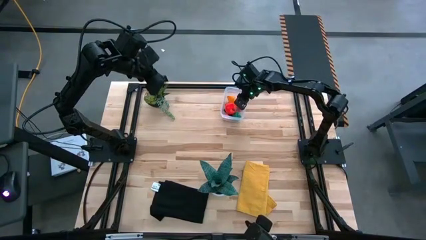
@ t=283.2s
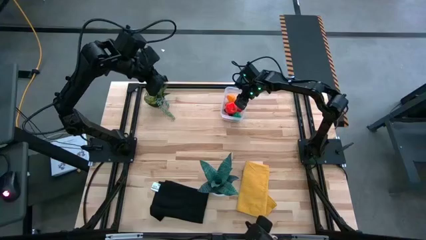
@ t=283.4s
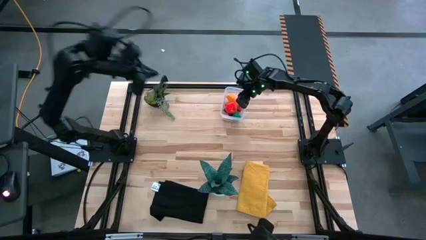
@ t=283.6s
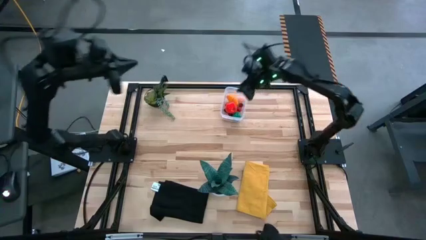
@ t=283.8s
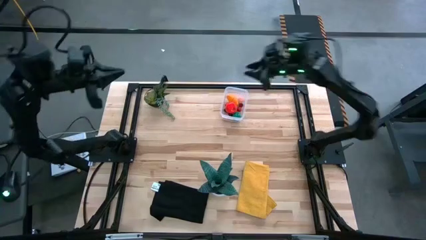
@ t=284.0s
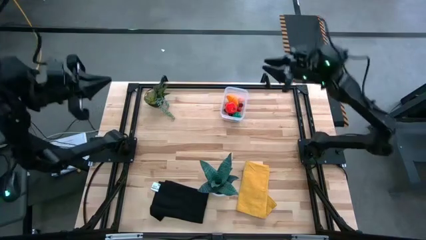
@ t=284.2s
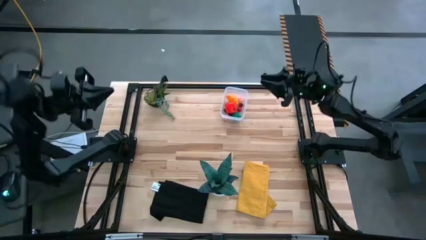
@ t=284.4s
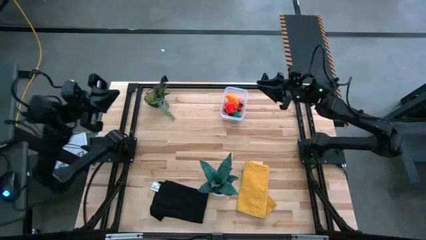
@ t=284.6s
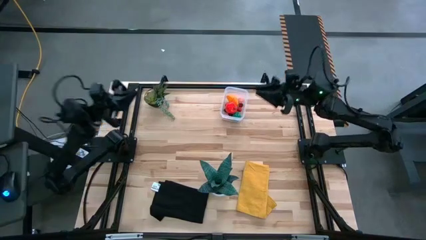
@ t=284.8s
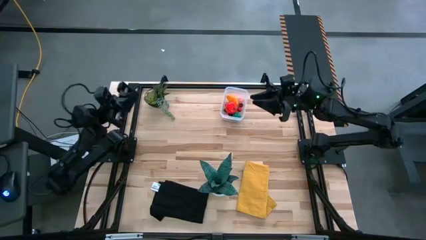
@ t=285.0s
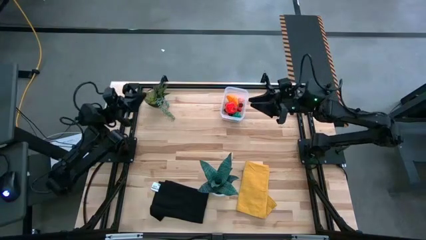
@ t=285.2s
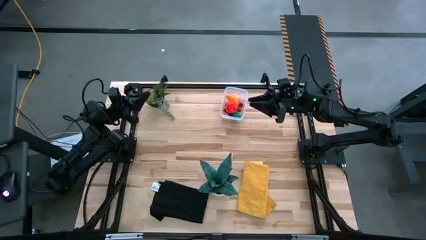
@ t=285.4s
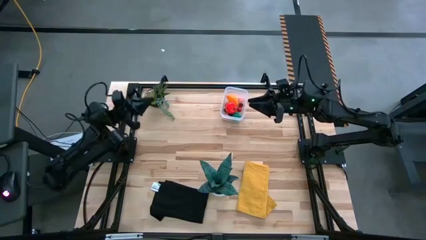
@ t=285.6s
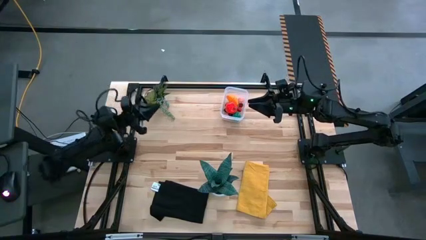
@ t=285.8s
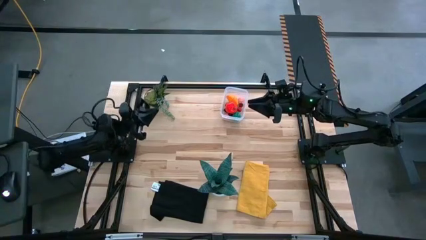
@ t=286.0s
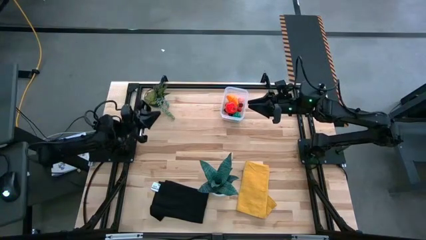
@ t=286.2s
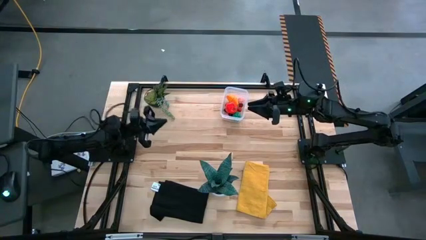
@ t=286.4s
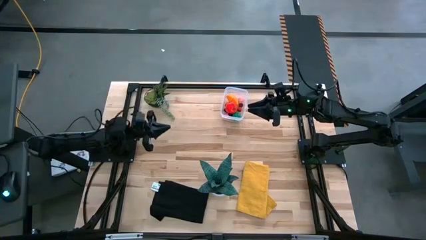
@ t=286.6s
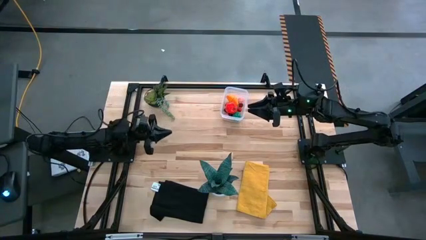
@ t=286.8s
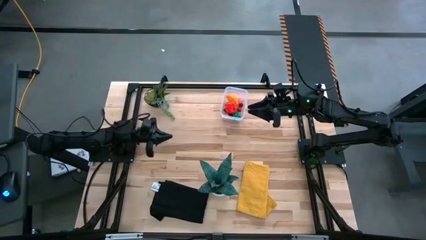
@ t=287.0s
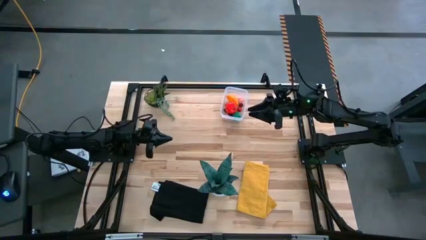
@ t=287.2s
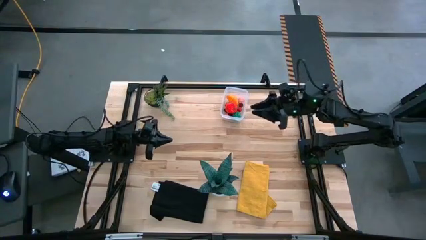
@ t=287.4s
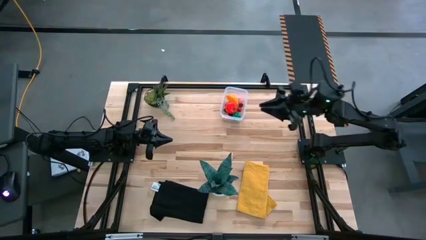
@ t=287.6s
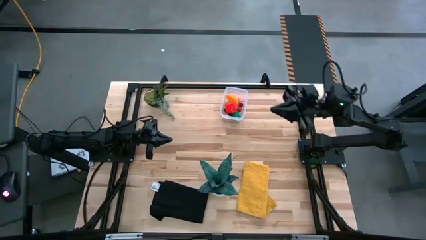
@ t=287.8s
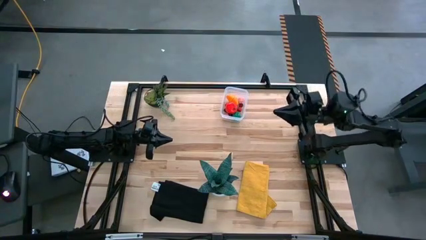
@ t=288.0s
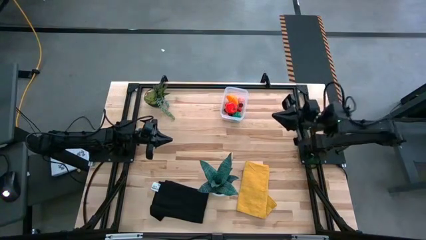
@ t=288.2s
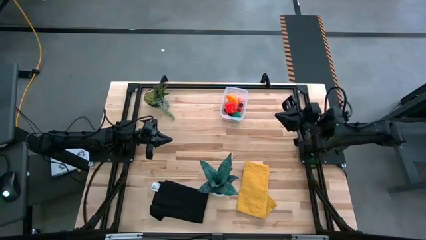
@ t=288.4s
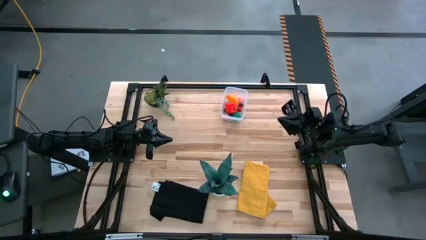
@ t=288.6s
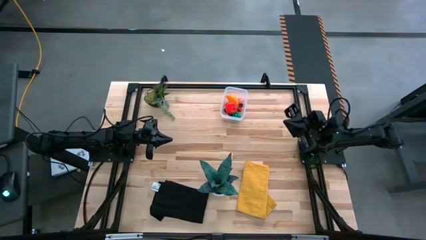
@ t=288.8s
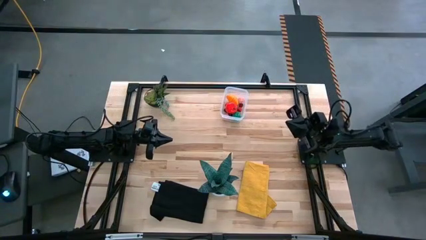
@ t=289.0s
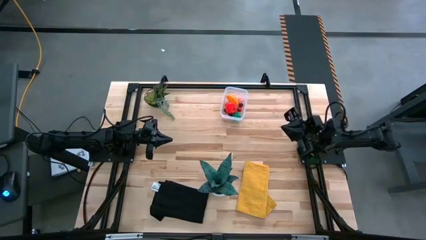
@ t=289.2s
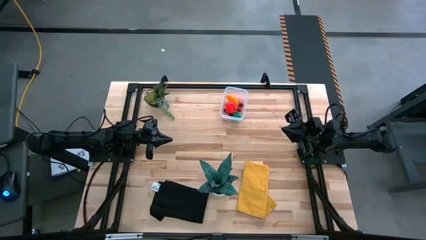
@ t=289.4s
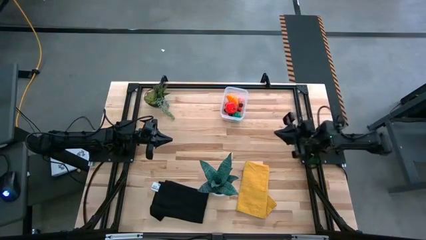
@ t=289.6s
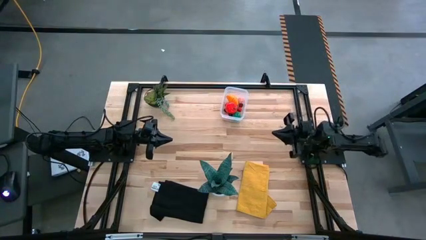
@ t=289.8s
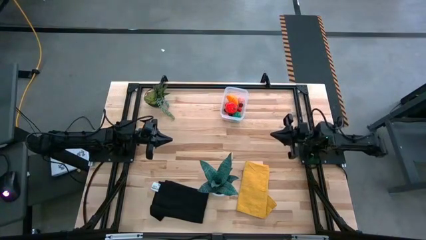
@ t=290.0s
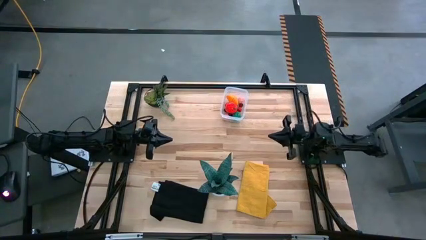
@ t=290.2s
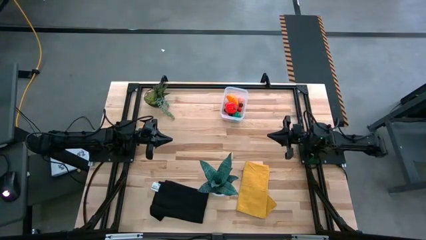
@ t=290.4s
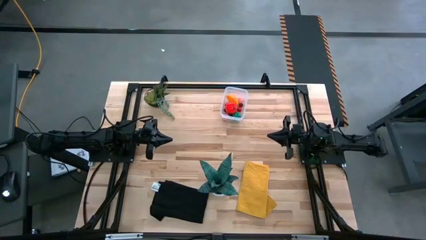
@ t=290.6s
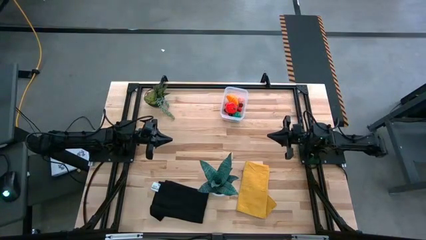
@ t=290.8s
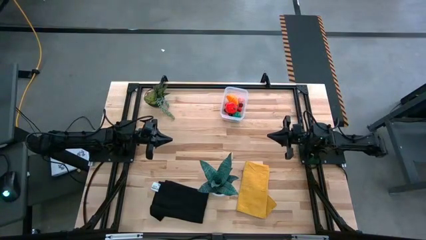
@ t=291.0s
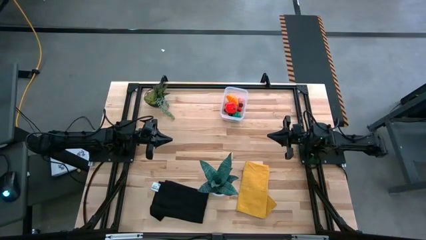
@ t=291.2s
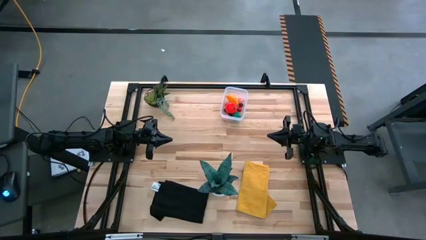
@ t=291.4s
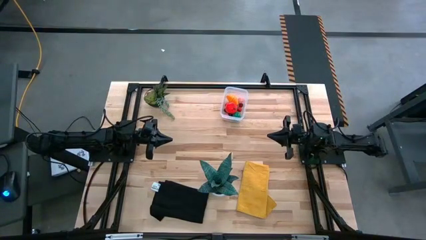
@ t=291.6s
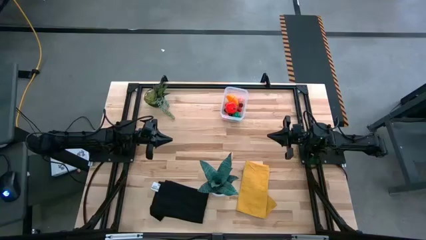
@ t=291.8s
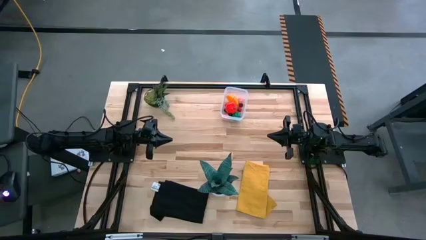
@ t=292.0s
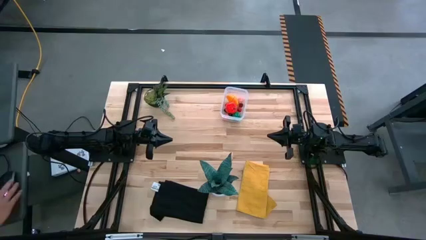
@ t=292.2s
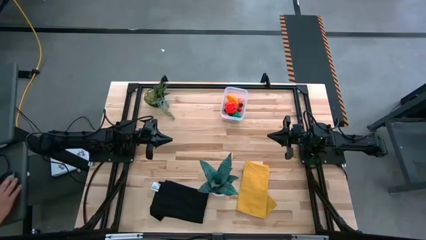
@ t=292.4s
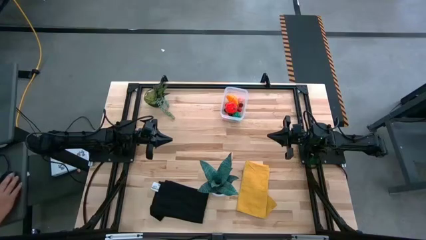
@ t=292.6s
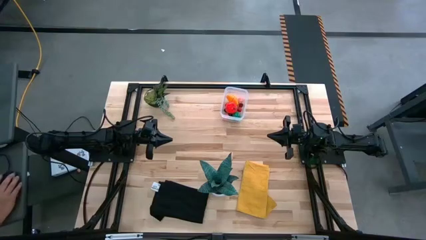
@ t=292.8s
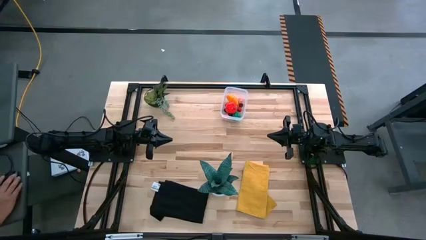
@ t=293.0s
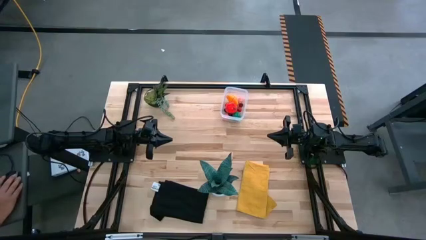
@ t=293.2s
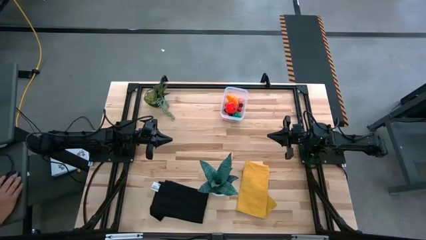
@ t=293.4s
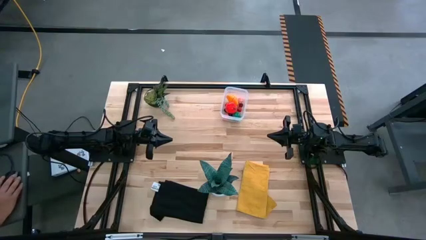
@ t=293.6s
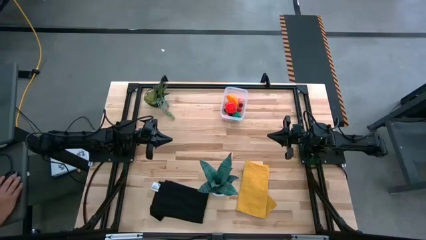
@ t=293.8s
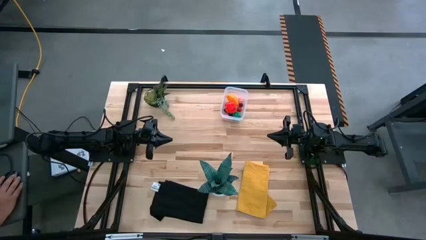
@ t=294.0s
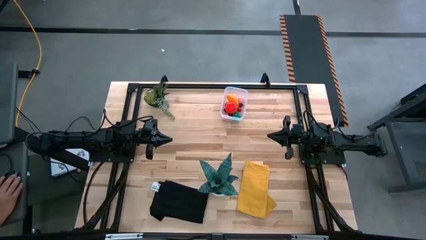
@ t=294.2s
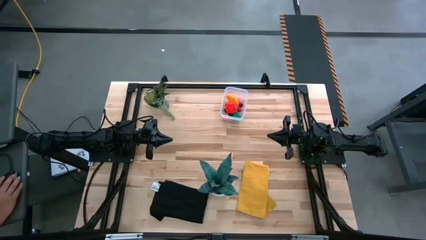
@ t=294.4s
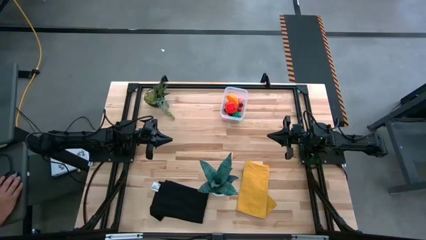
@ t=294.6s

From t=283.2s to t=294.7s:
Task: Pick and placing Produce into tupperware
Return to home position

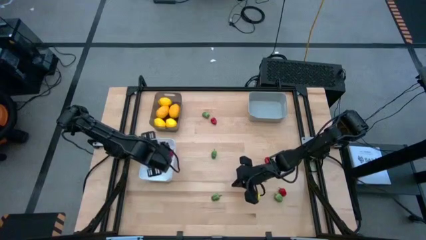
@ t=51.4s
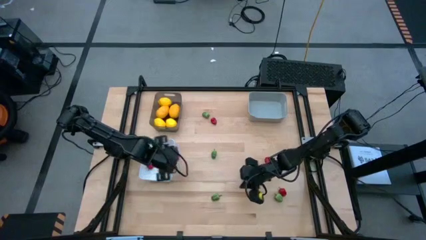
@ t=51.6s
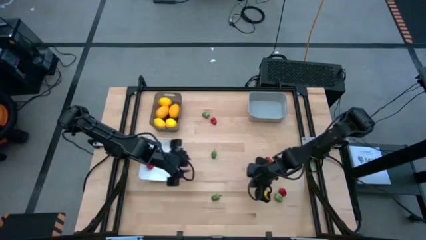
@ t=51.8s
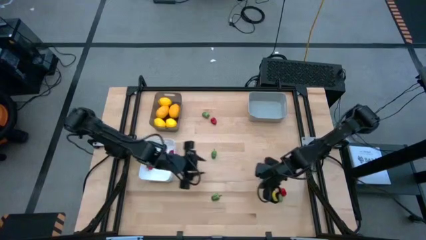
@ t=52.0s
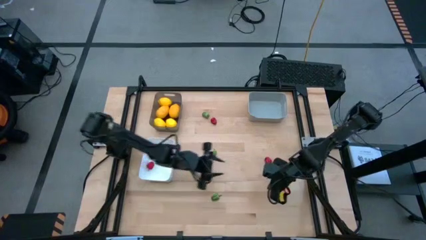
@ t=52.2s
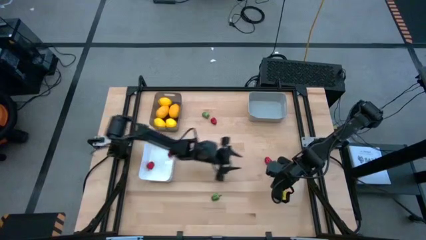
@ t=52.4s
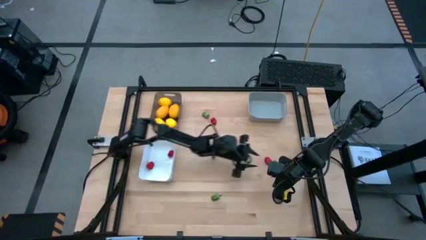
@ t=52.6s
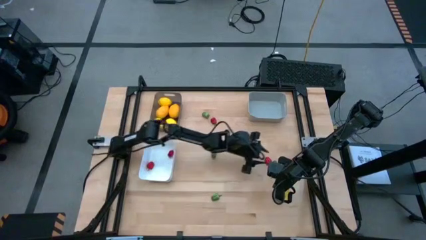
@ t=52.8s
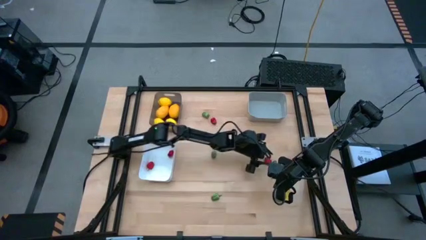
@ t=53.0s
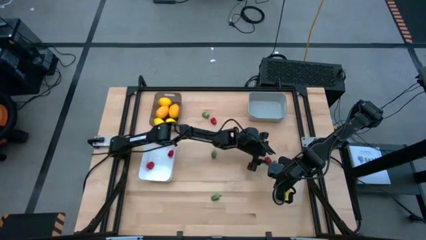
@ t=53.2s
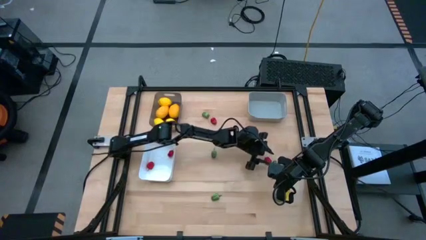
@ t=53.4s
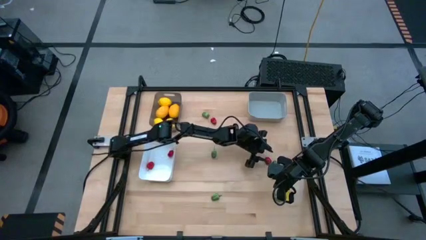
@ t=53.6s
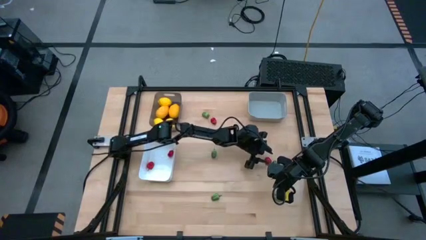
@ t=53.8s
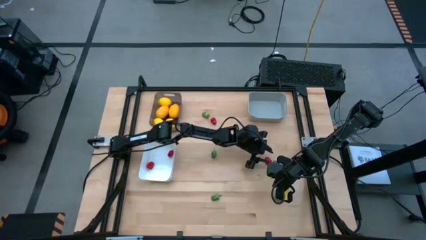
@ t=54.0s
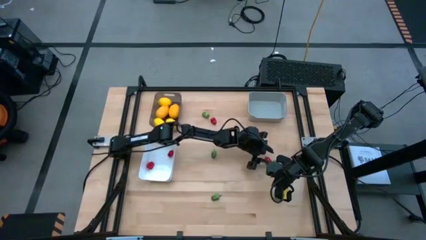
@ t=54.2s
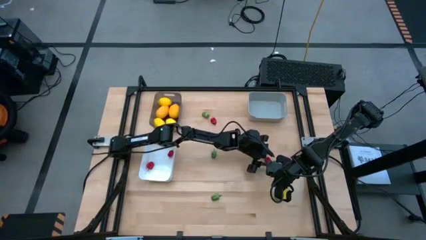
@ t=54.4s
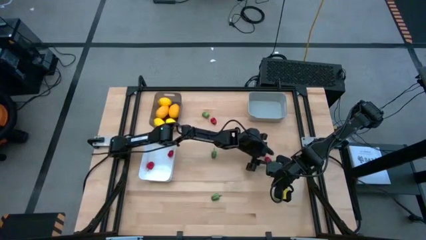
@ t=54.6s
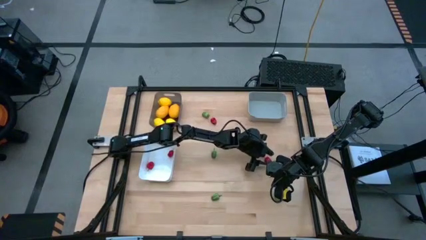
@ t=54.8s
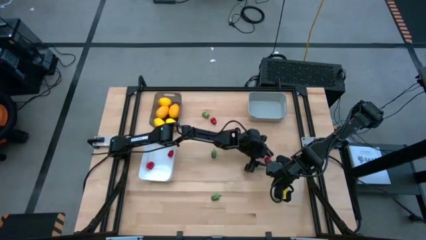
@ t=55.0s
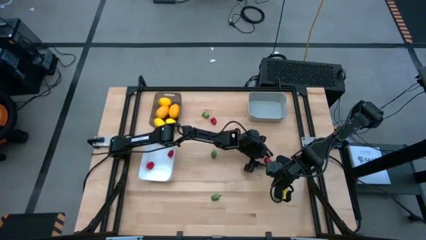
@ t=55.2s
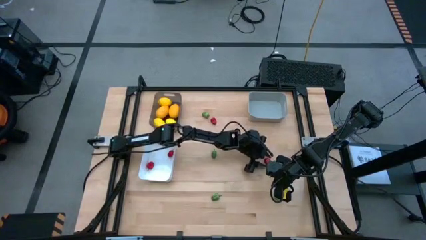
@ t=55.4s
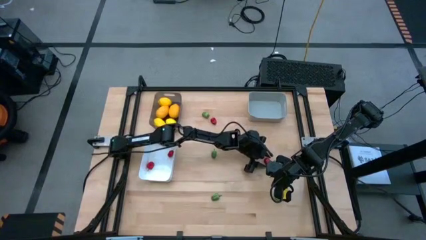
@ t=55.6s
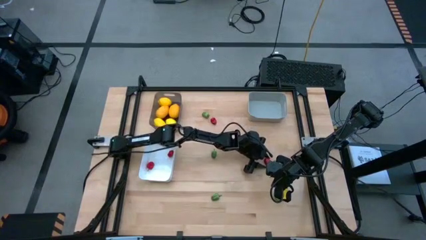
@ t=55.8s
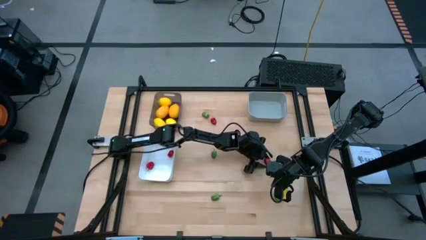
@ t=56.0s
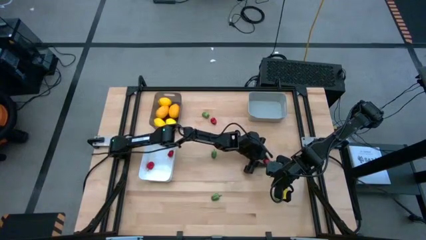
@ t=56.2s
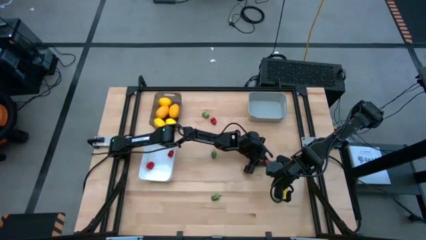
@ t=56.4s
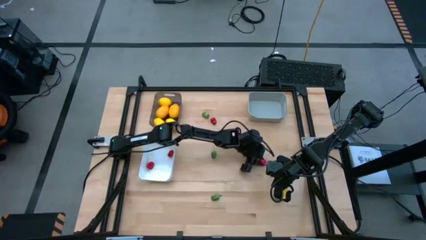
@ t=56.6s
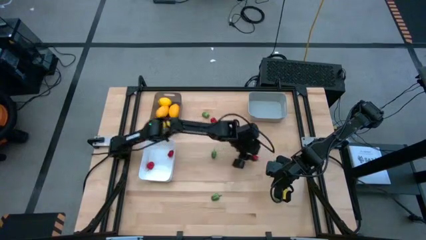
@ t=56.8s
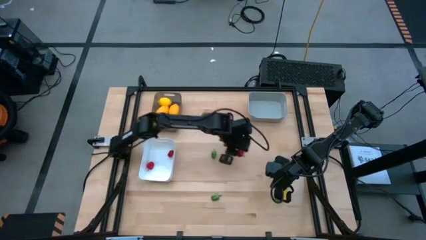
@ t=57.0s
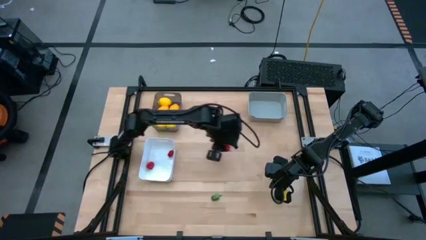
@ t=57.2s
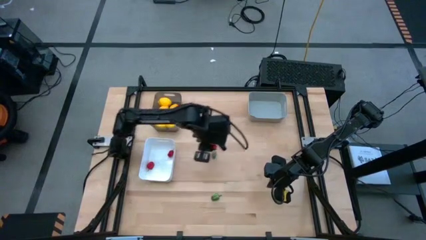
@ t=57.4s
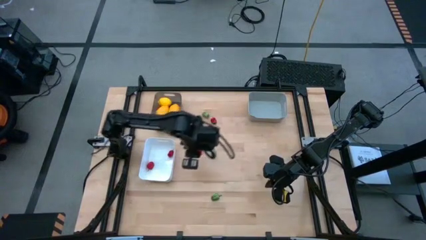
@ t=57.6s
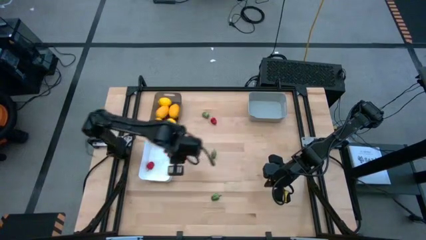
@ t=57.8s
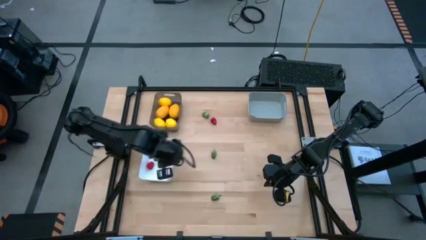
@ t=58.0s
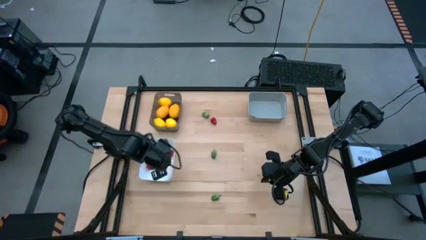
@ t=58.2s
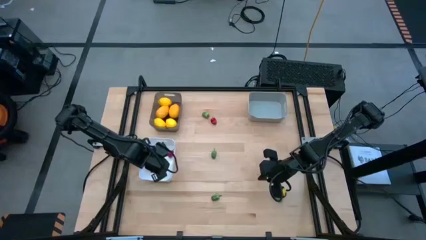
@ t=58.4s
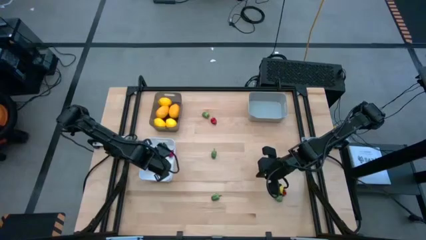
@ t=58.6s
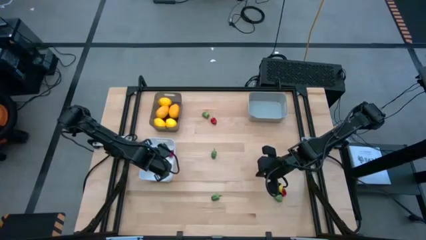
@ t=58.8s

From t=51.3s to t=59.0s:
Task: Sort produce into baskets
Put the middle right red chili pepper into the white bin
